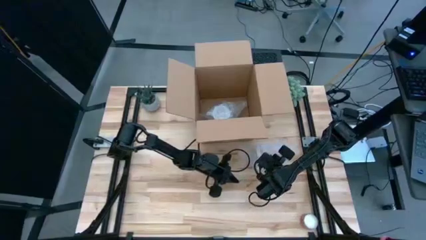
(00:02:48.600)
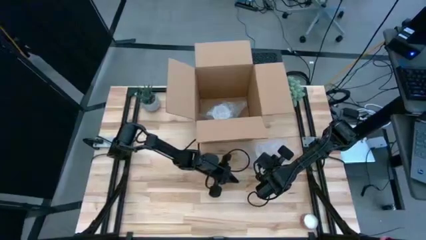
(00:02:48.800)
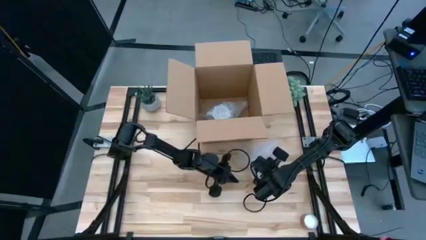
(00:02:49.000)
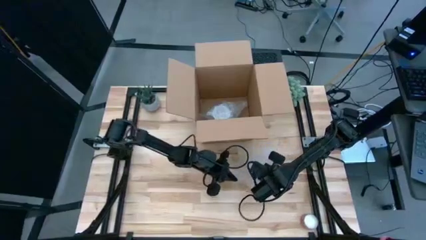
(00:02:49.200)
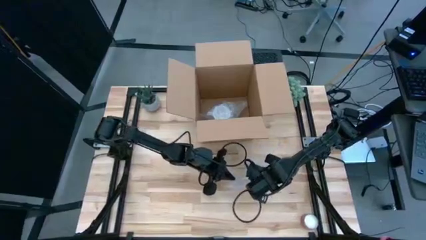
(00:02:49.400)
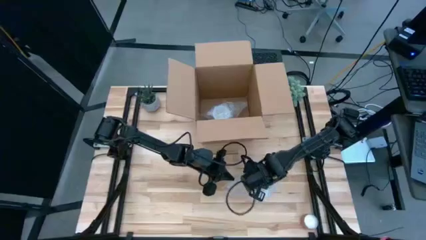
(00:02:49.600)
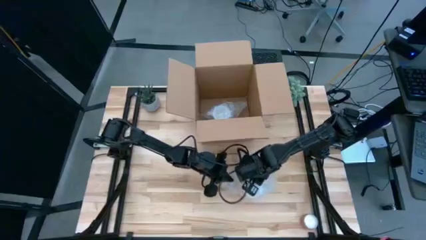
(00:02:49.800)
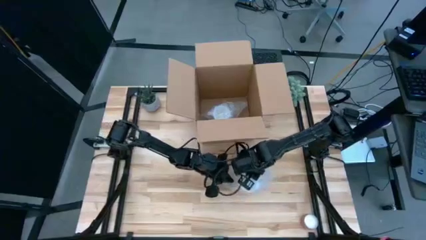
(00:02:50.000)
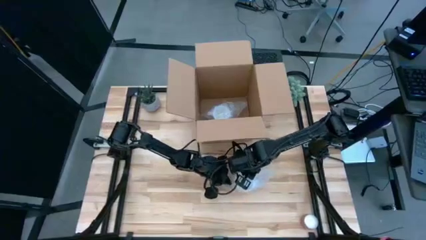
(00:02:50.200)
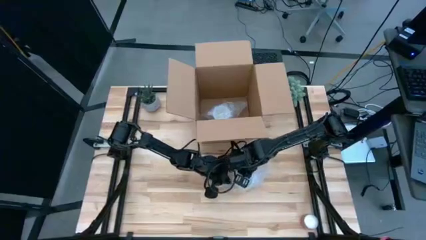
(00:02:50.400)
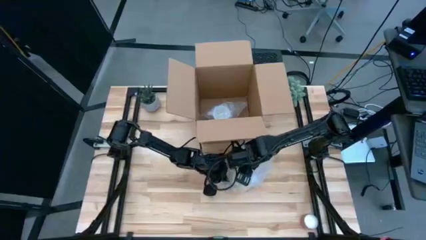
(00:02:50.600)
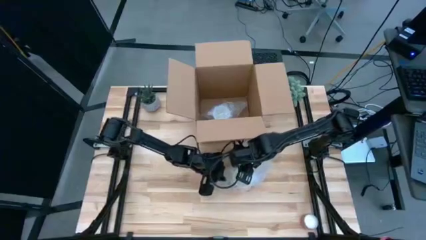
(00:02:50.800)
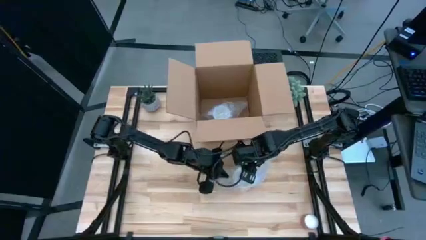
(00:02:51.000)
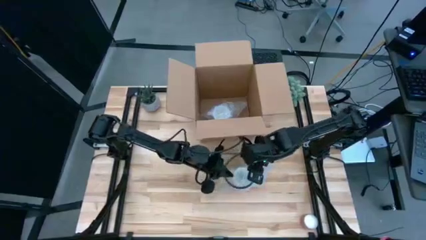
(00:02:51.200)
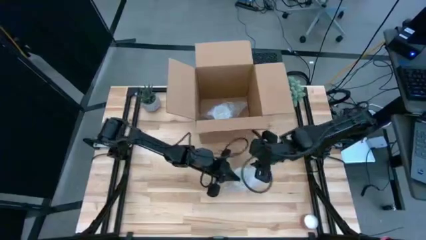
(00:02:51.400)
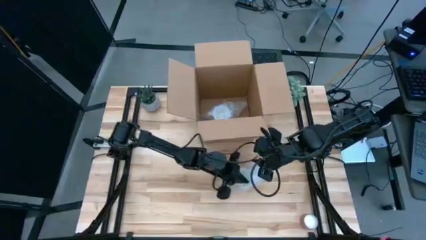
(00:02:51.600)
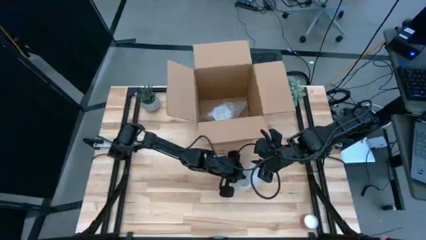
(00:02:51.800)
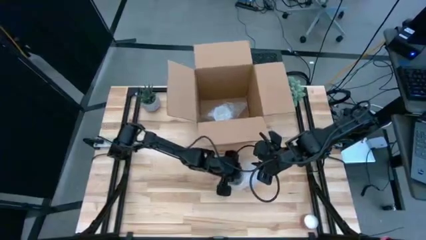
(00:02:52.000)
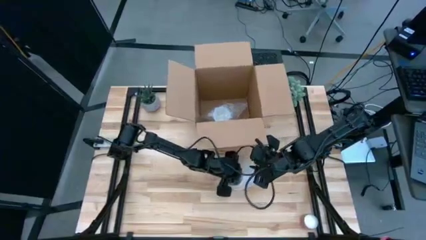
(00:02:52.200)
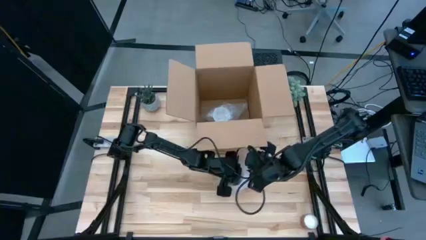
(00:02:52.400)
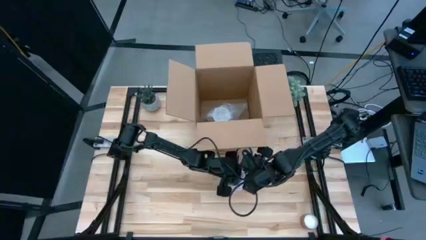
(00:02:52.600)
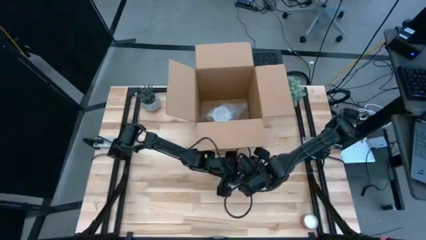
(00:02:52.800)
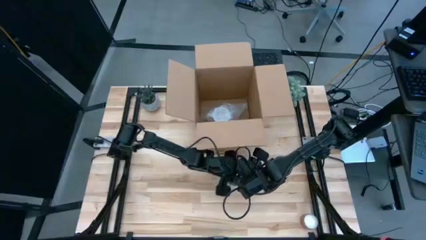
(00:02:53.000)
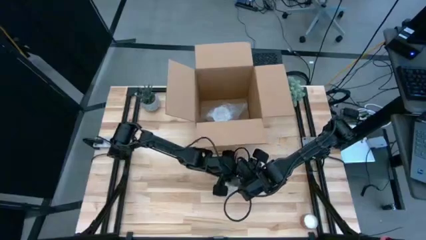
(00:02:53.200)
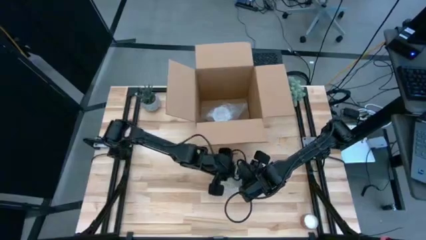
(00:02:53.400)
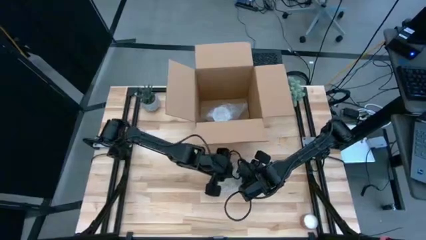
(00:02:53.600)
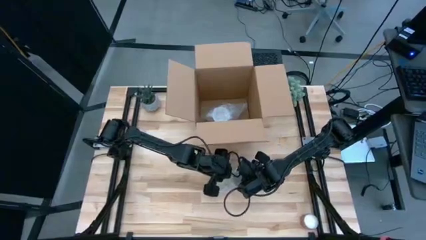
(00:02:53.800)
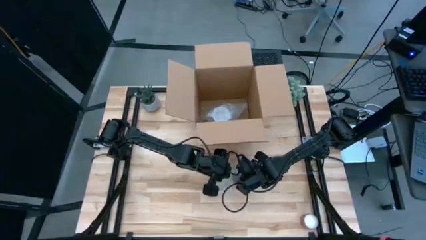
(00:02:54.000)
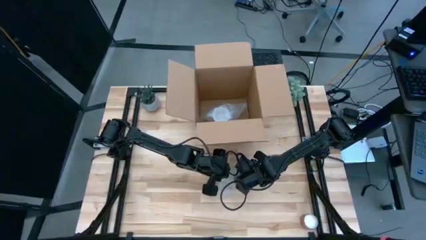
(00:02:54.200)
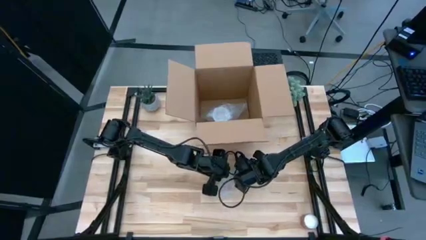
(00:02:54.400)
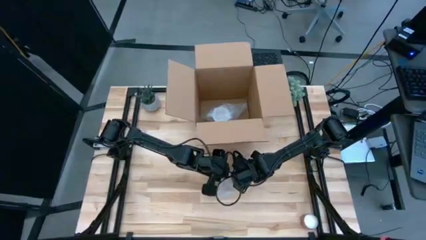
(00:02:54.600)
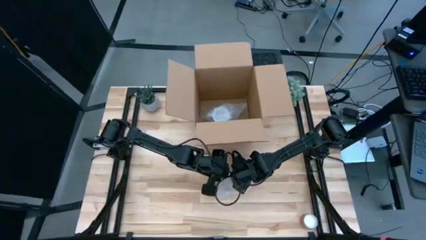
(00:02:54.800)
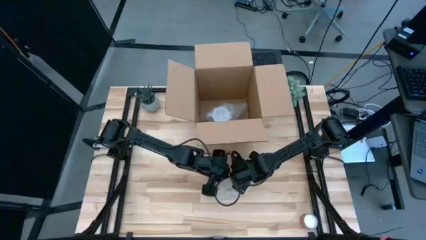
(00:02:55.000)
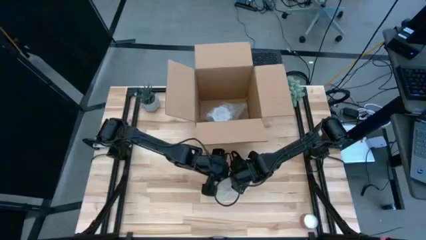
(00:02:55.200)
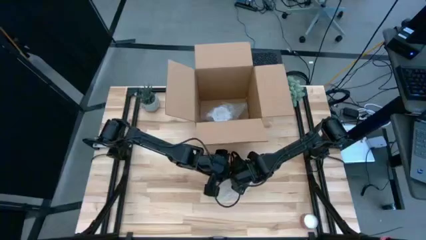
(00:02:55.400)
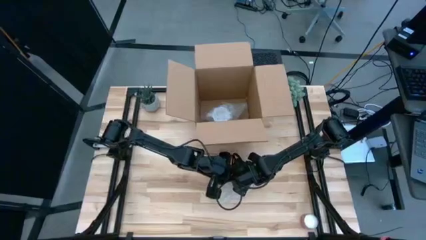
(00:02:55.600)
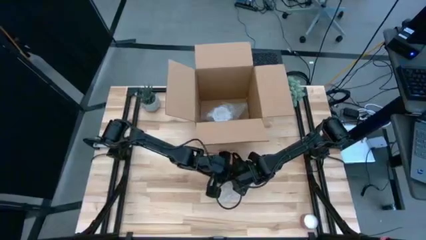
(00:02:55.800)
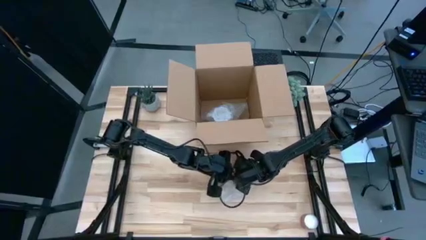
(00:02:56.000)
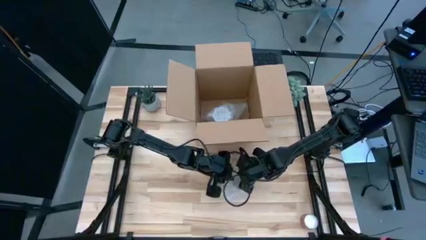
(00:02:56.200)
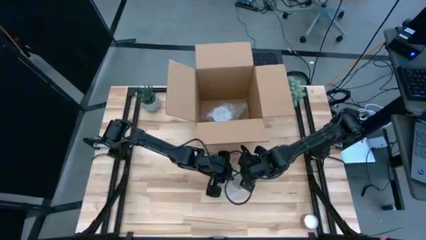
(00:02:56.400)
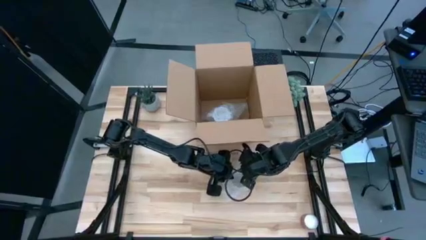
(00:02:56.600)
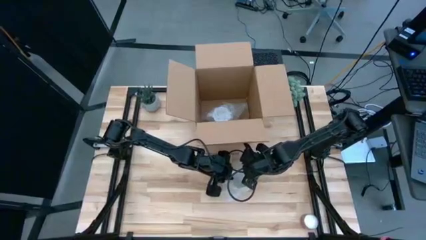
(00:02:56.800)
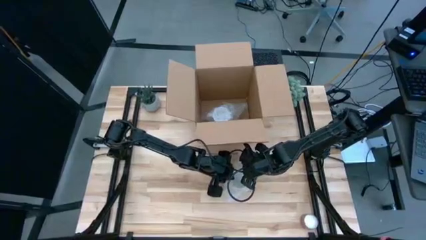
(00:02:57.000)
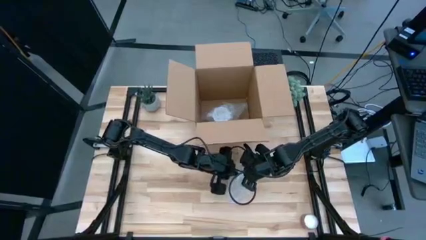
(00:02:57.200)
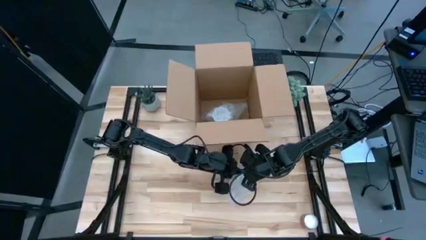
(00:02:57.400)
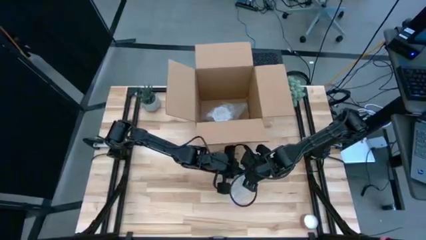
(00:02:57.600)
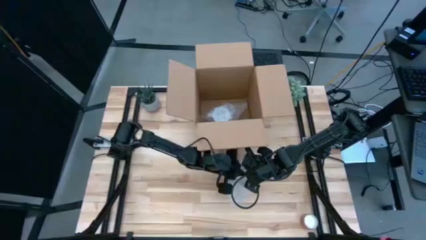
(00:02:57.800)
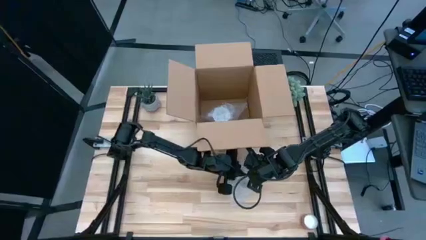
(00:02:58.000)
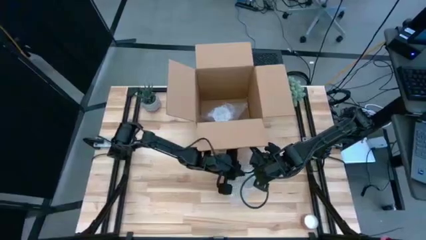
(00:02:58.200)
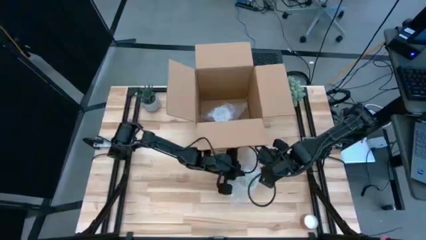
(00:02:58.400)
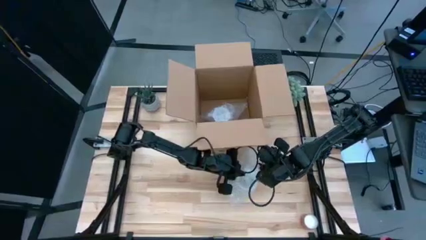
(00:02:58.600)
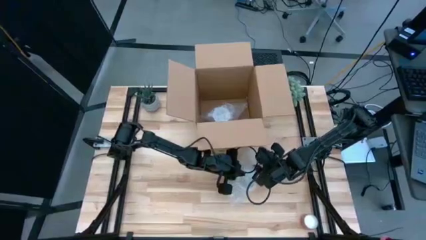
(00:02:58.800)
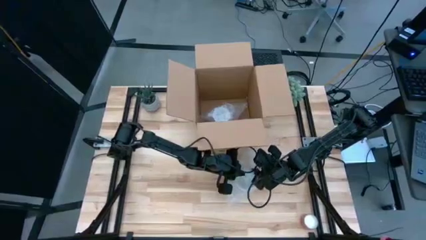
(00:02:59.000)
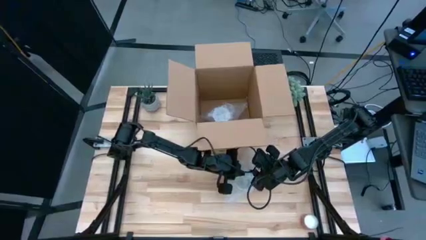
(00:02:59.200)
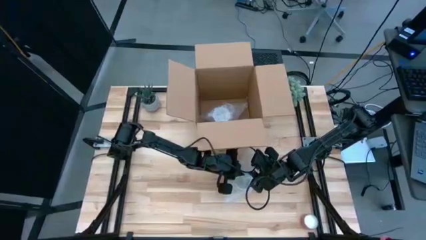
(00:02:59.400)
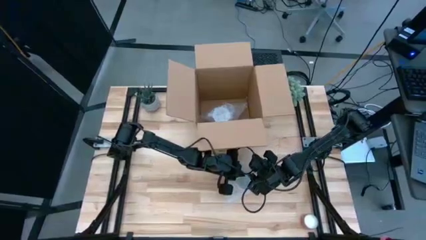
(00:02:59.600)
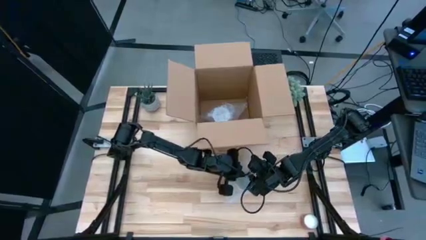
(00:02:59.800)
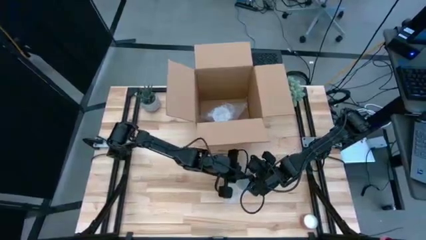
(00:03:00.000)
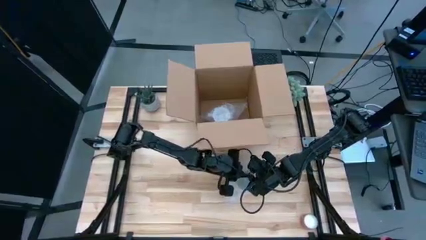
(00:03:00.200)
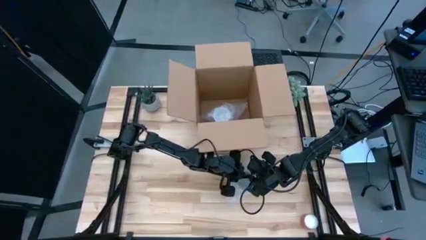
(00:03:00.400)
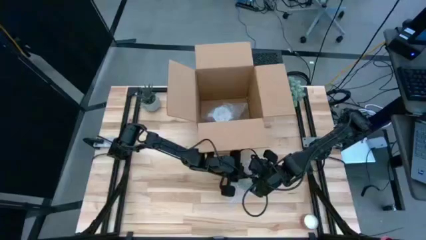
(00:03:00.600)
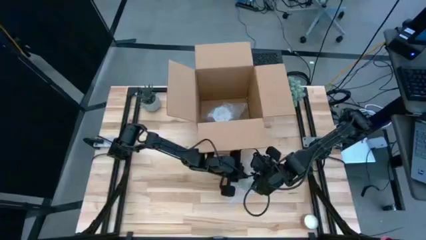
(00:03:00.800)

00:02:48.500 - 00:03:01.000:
Task: wrap mug
Wrap the orange mug with the bubble wrap

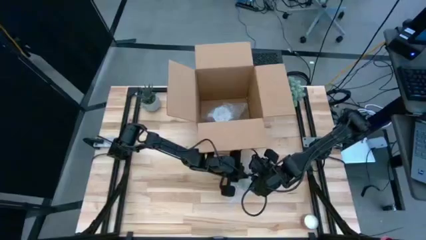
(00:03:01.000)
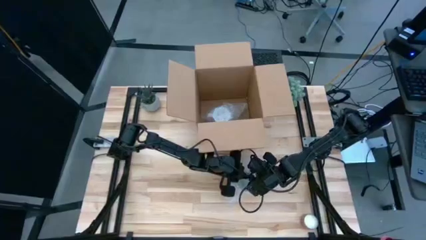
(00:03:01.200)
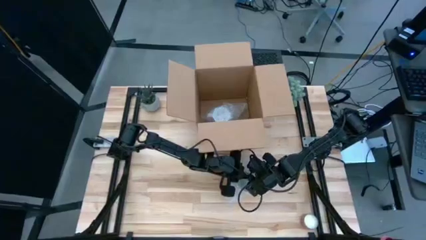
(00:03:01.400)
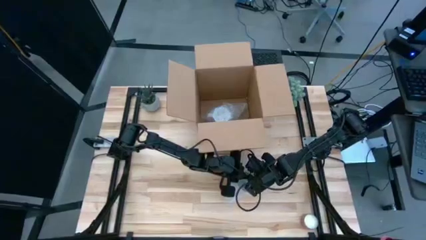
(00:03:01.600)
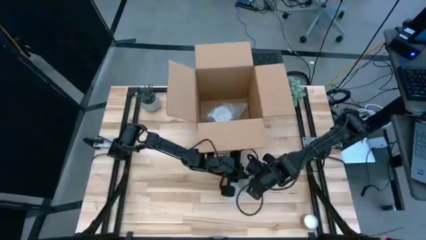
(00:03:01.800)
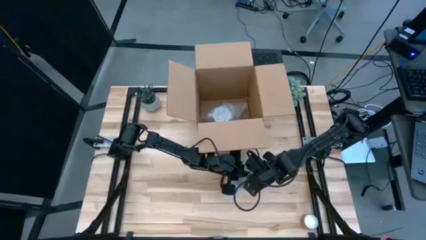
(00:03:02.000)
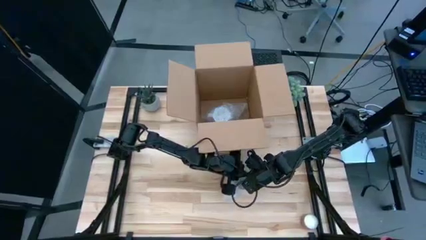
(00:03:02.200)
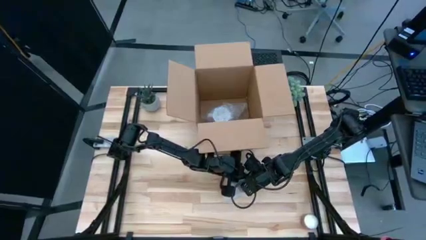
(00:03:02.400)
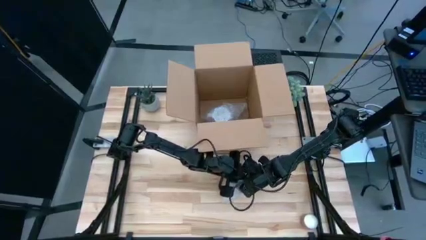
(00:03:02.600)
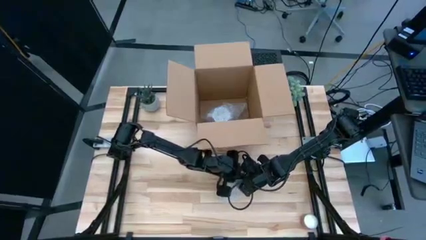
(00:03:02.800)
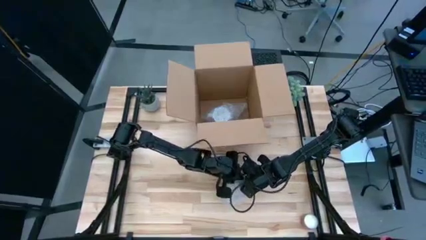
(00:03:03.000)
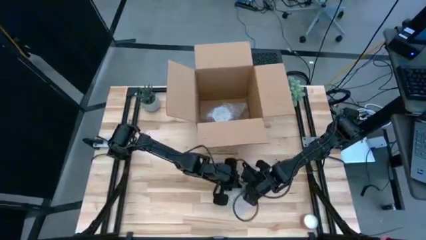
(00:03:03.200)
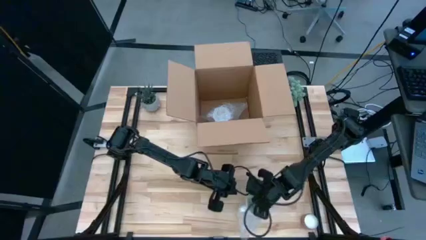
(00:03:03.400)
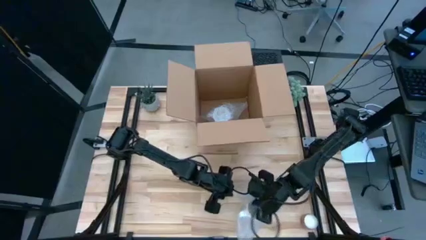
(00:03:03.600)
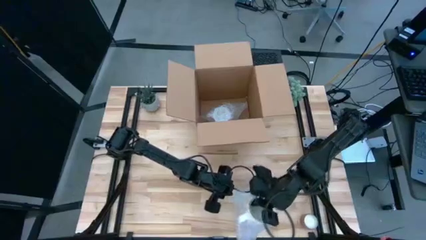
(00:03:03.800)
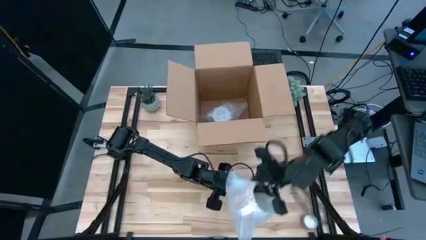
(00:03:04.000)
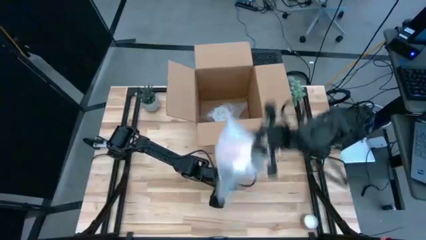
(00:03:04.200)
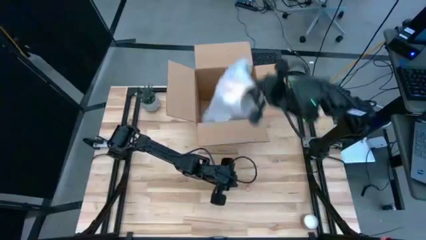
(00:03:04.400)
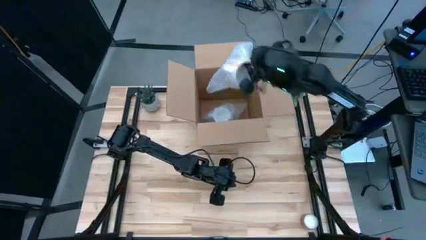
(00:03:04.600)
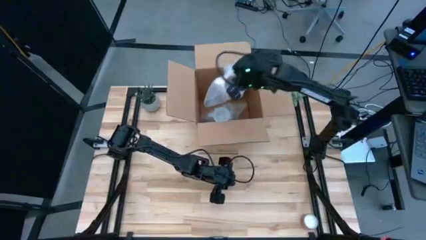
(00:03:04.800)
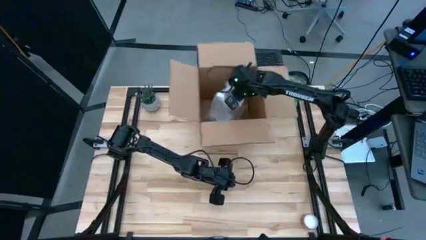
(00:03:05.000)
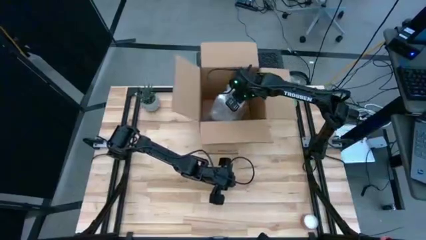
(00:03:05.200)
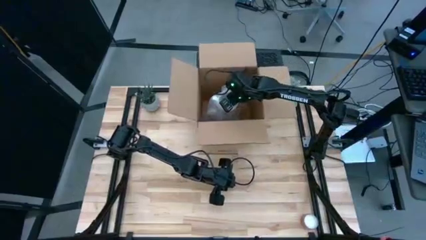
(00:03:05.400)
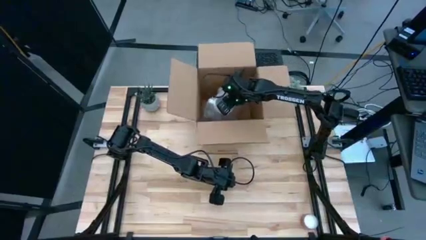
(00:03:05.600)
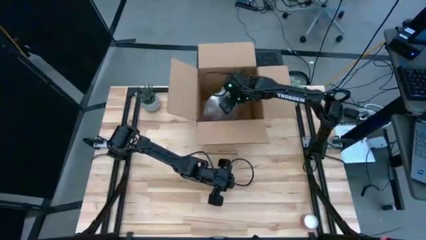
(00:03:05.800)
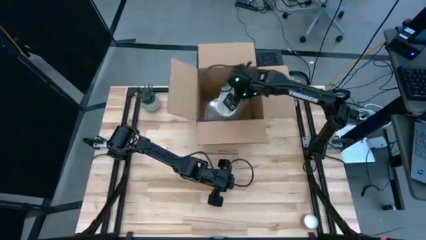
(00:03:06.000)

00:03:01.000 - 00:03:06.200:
Put the wrapped orange mug into the cardboard box
